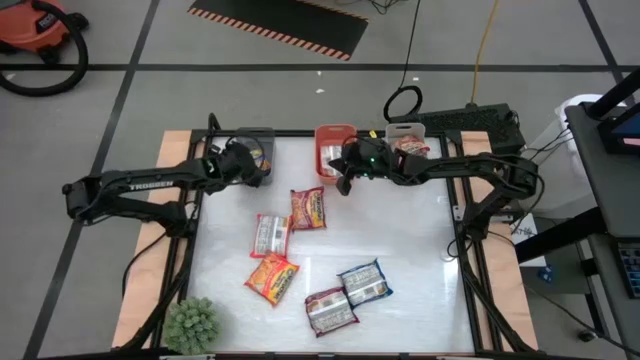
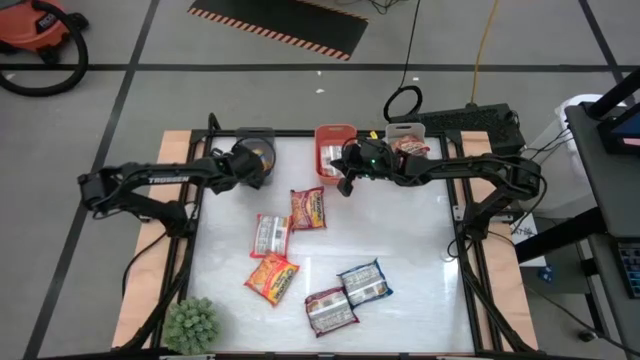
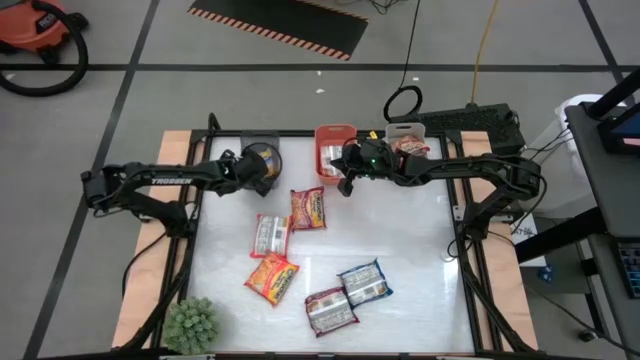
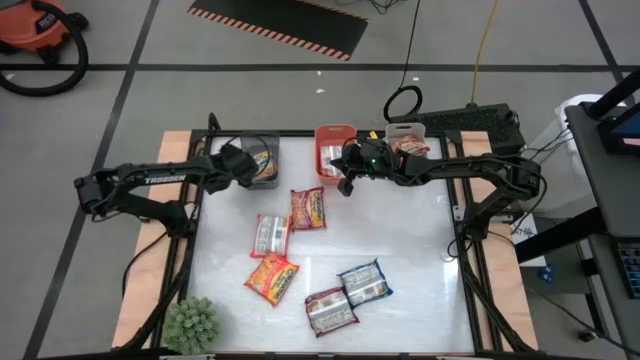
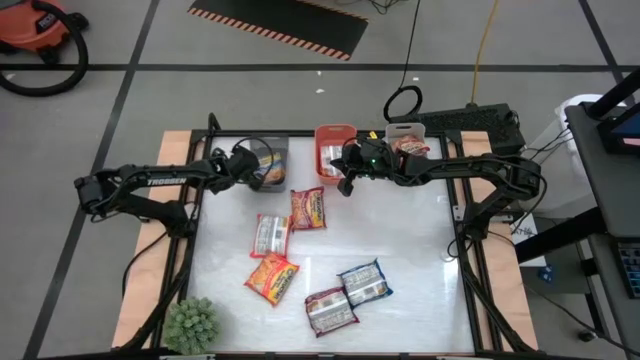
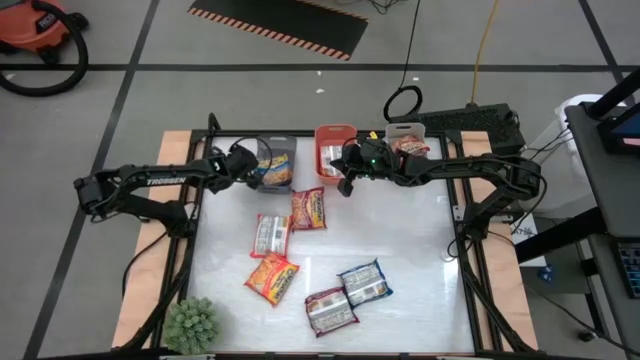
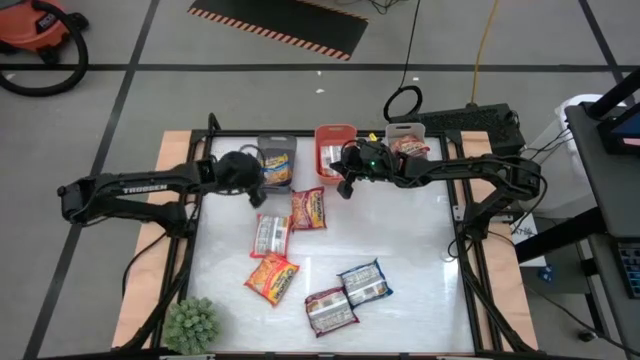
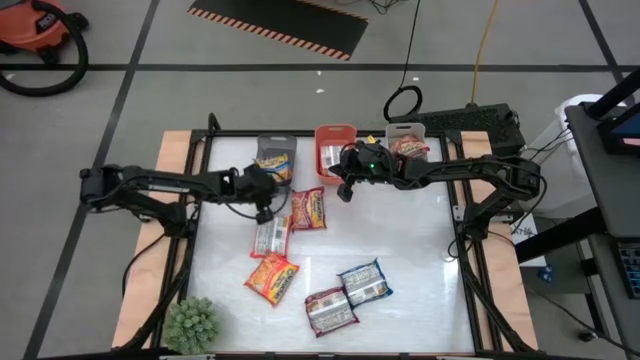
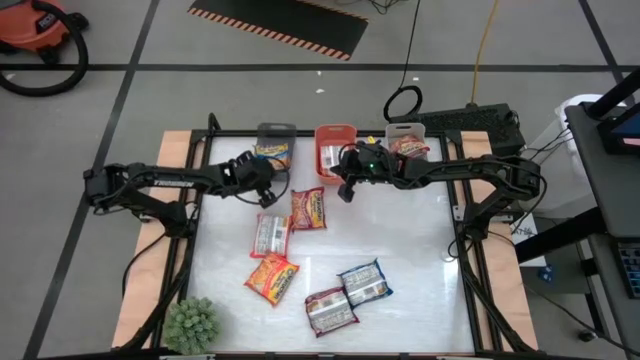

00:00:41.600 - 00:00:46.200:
Task: Sort Maruchan noodles
Adjust the black bin

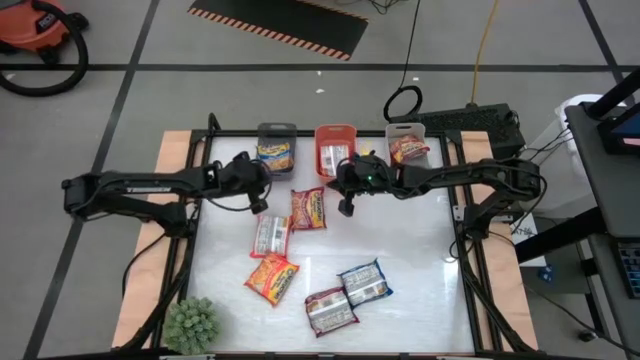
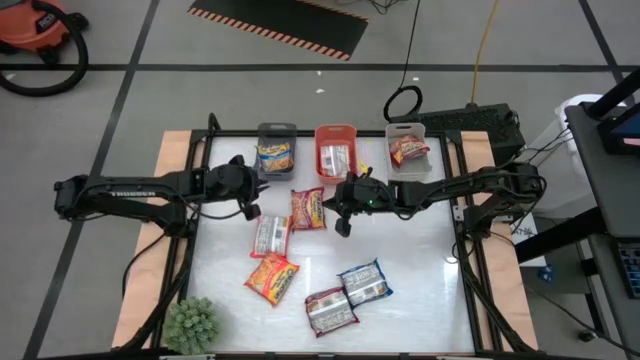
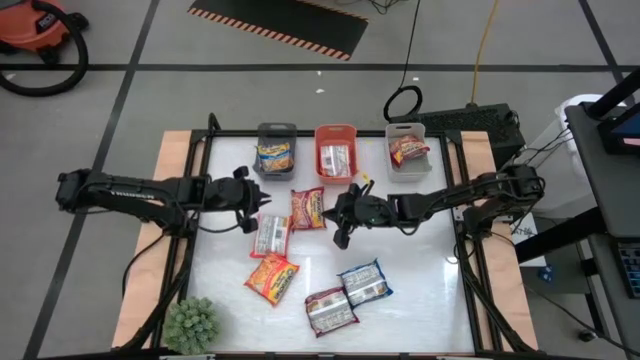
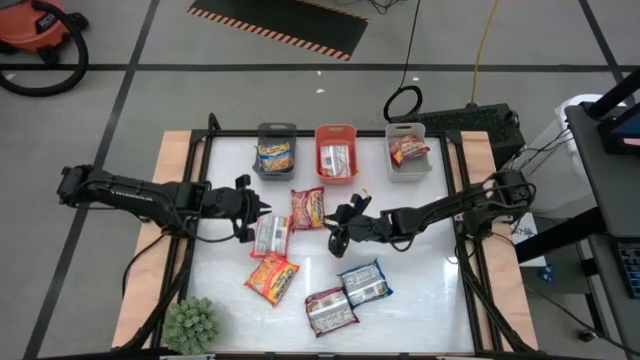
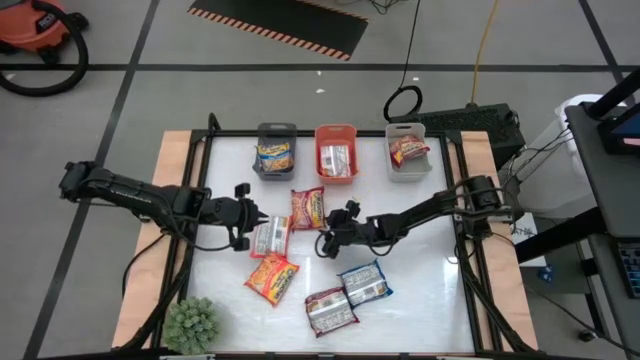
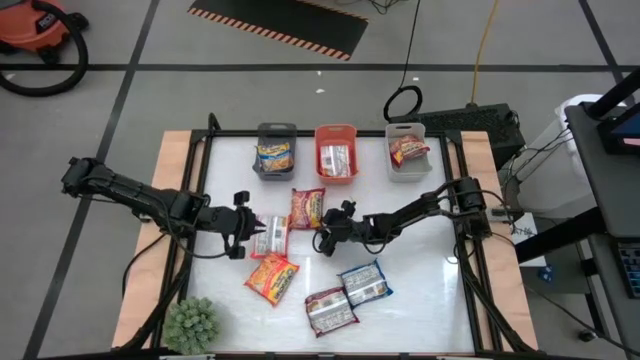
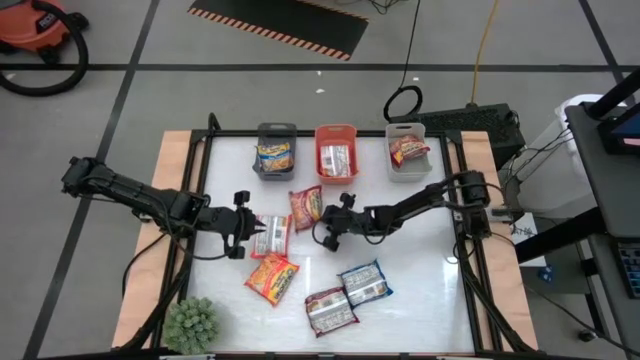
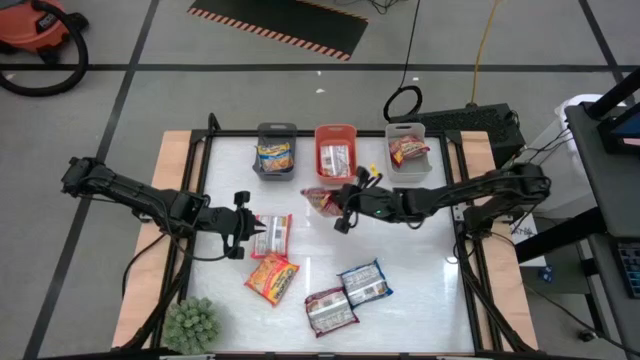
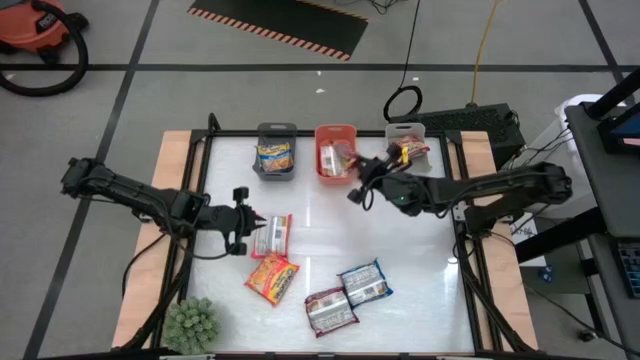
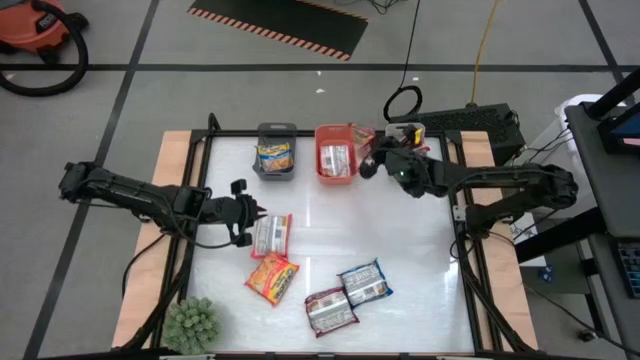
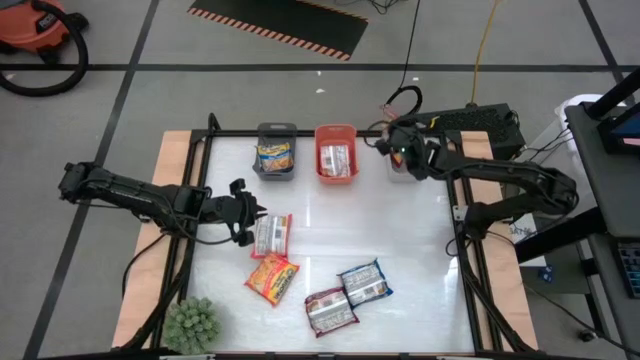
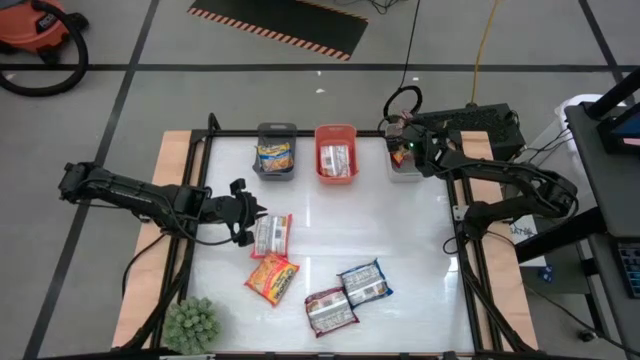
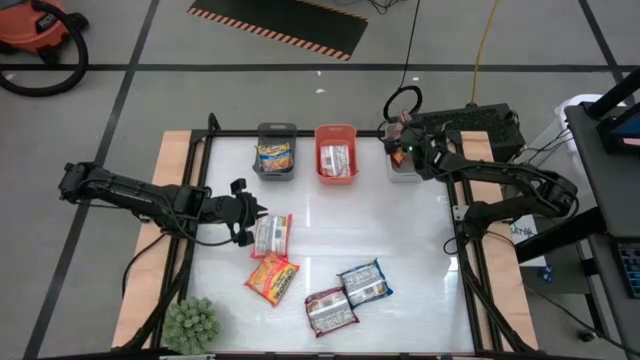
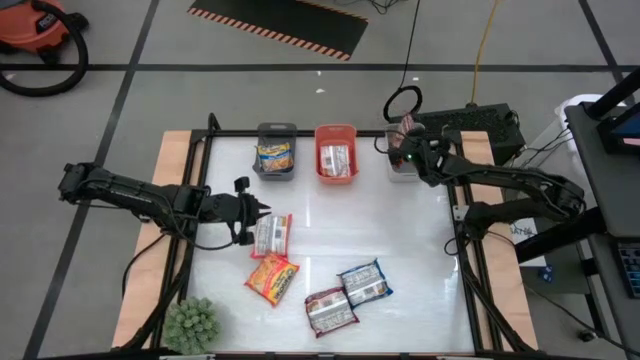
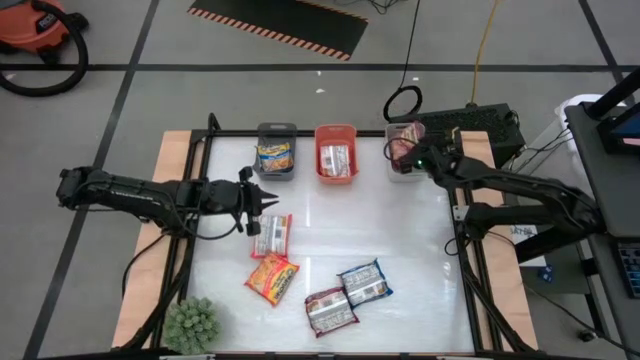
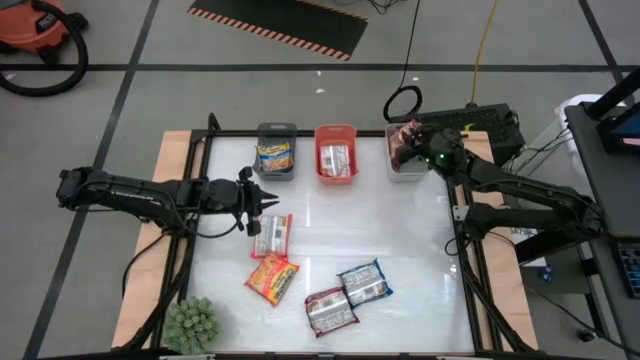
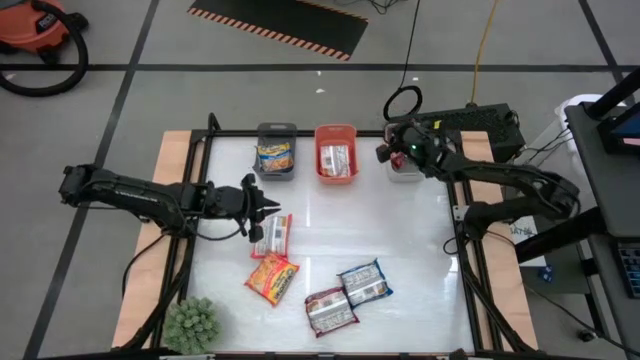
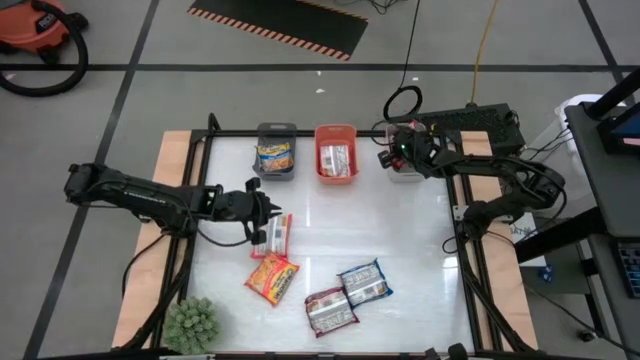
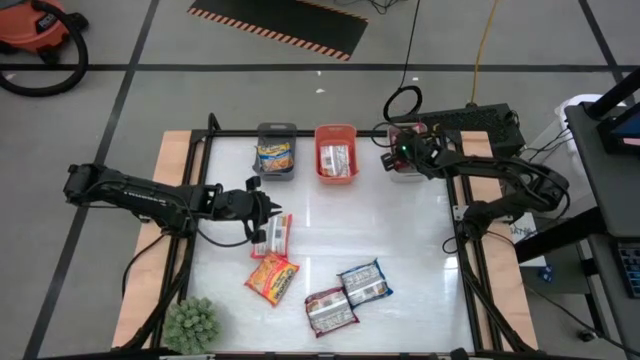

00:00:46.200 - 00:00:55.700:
Put the top red noodle pack into the gray bin

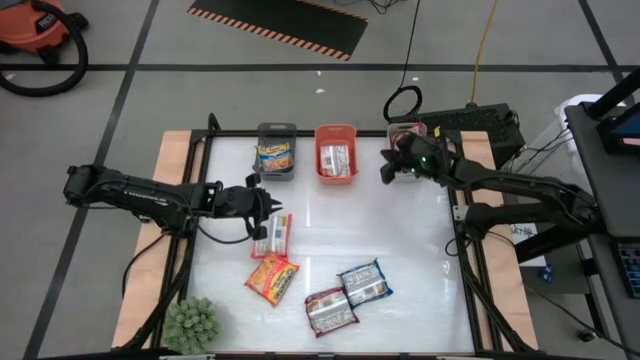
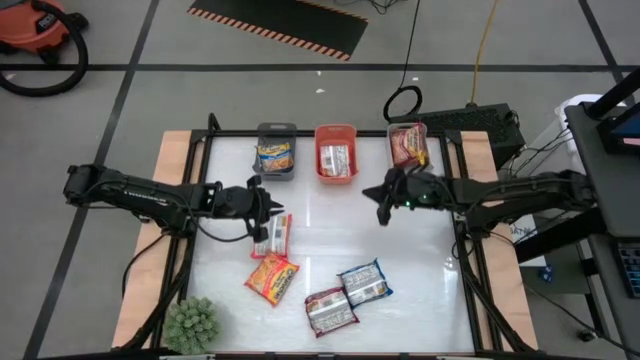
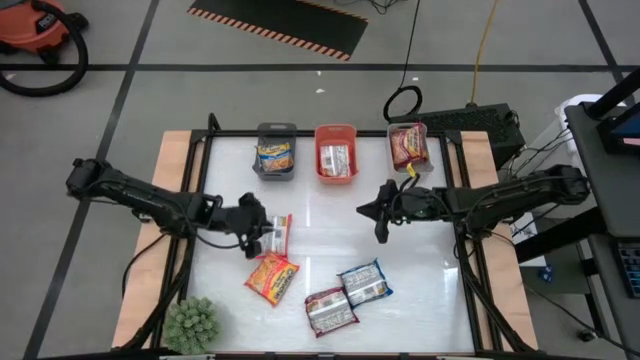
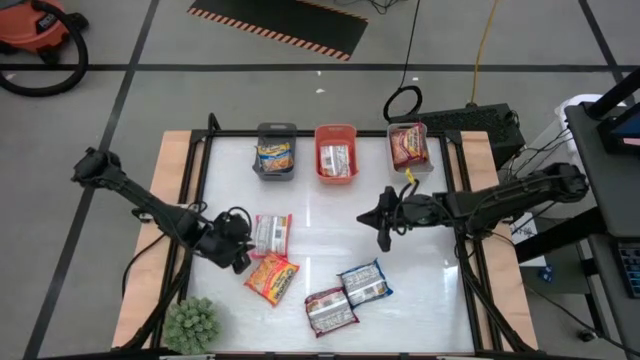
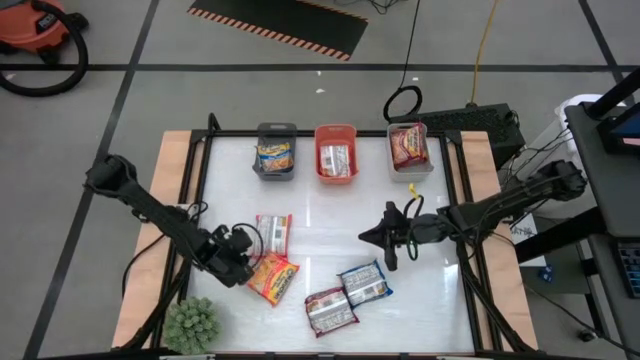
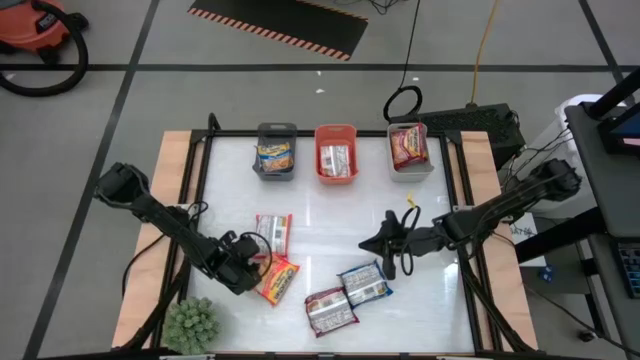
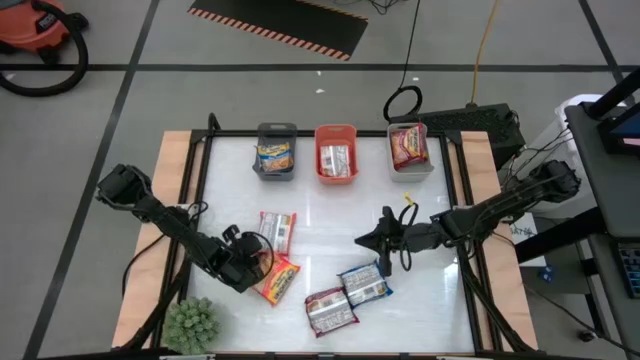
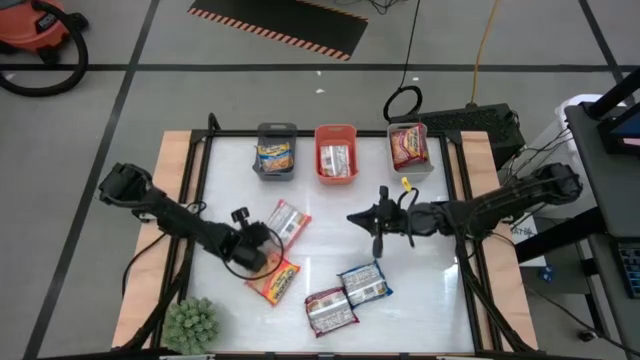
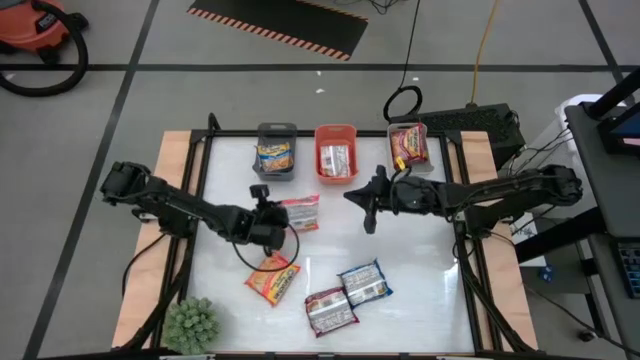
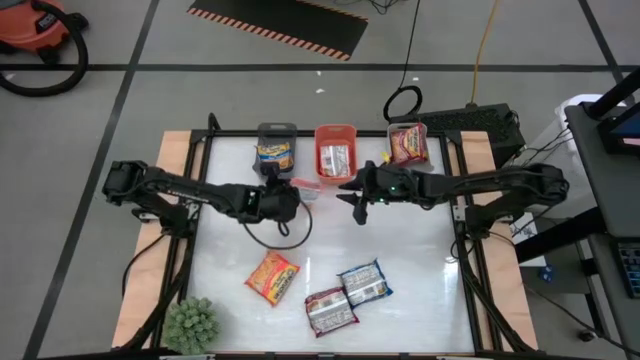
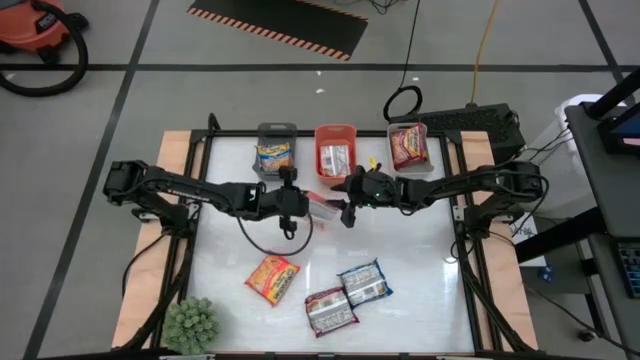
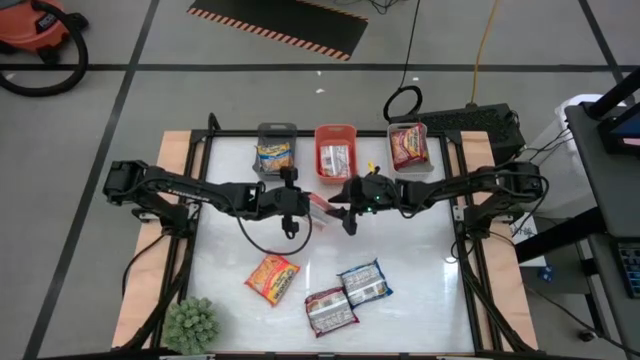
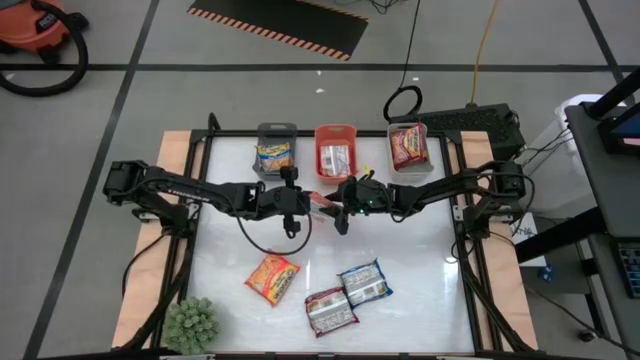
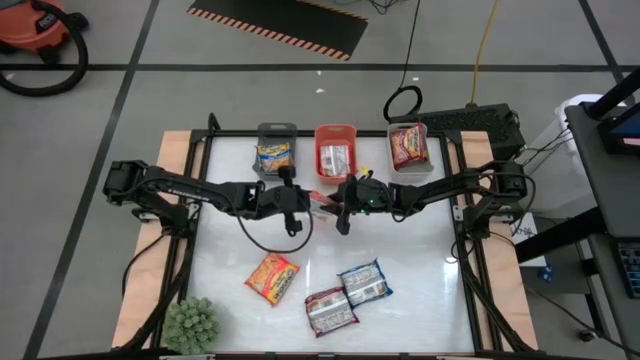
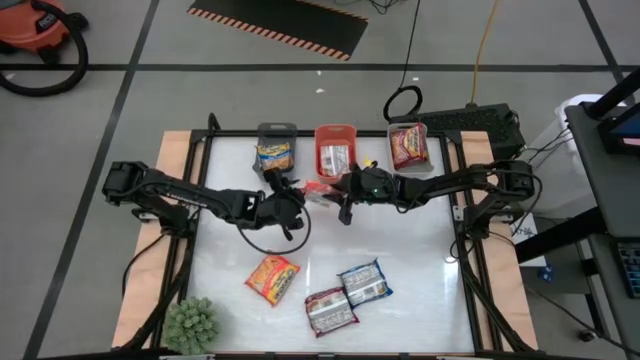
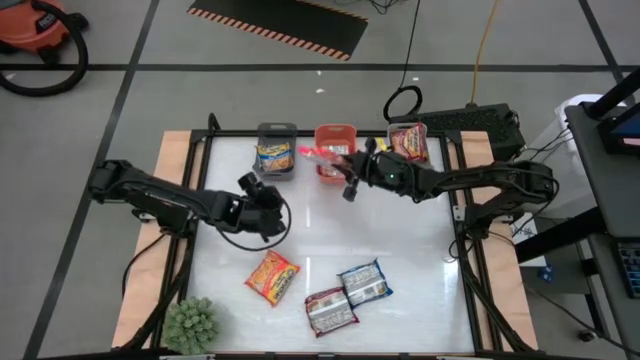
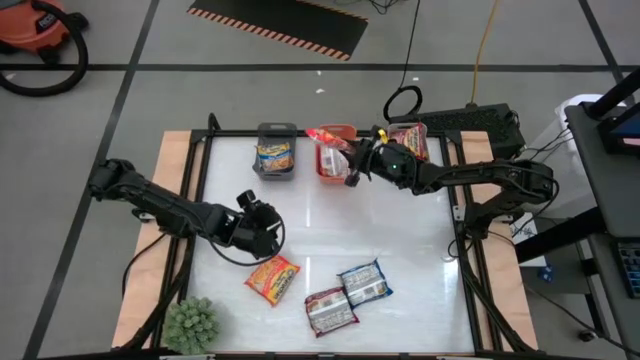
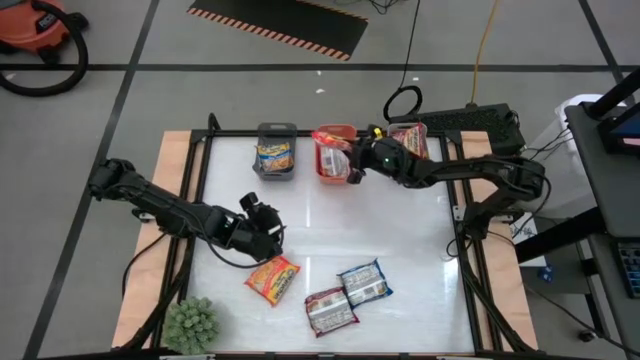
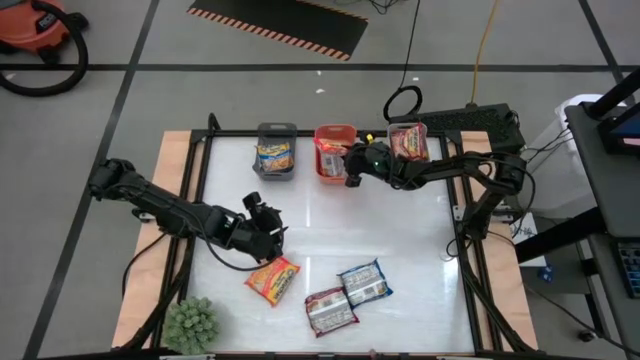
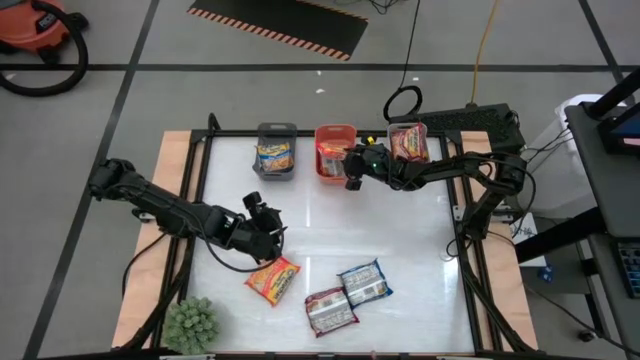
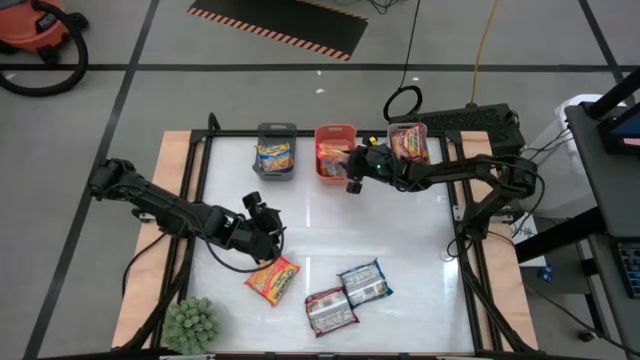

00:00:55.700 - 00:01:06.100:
Put the top orange noodle pack into the orange bin
